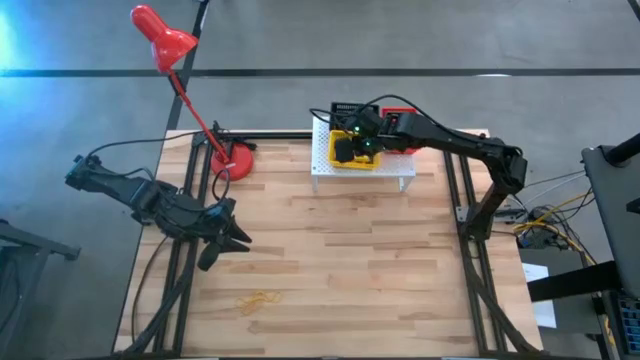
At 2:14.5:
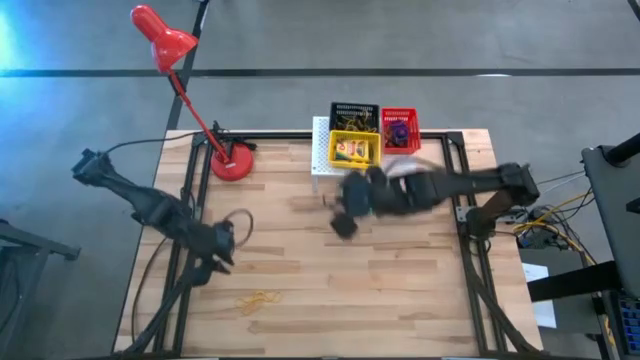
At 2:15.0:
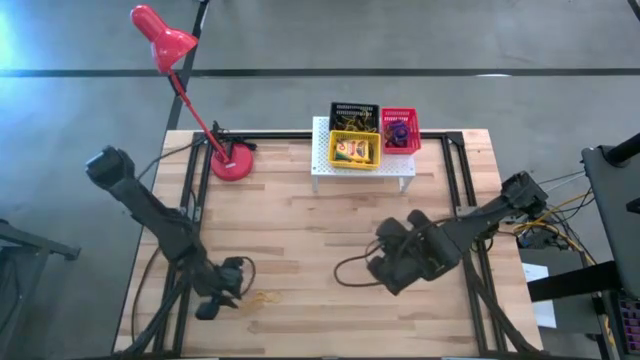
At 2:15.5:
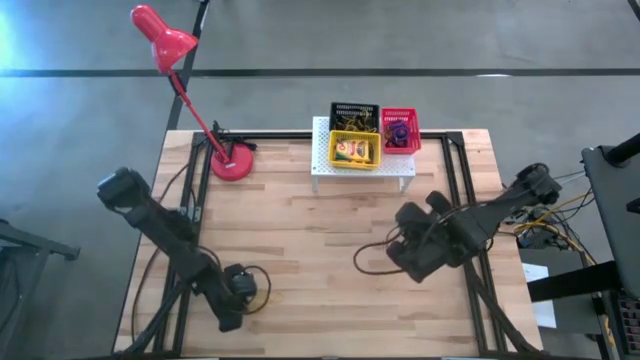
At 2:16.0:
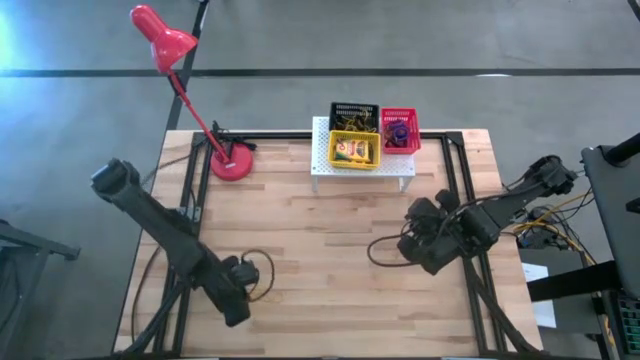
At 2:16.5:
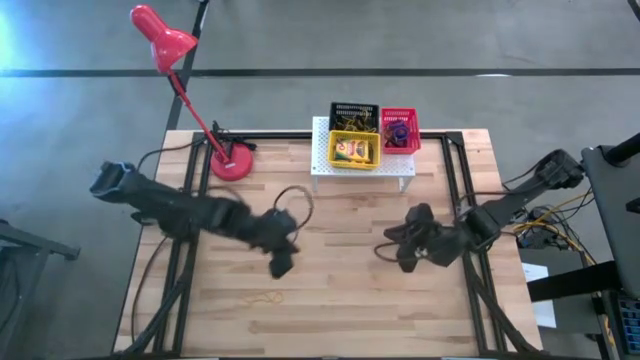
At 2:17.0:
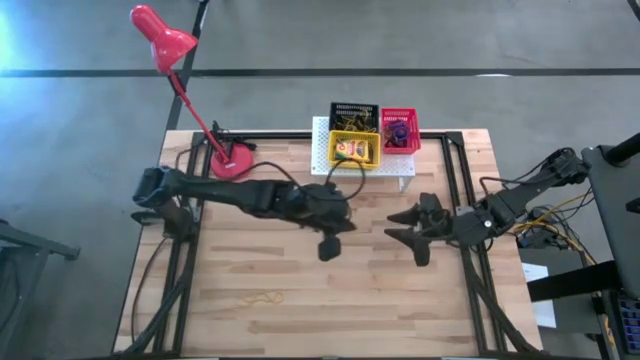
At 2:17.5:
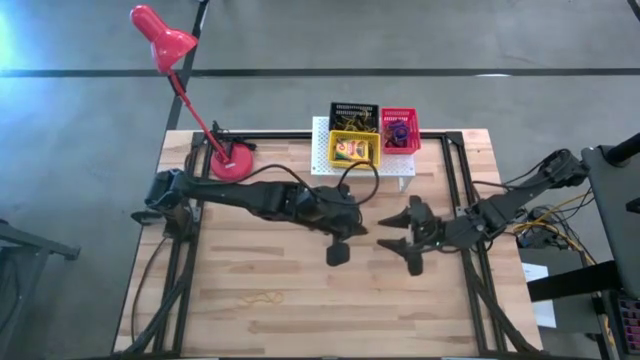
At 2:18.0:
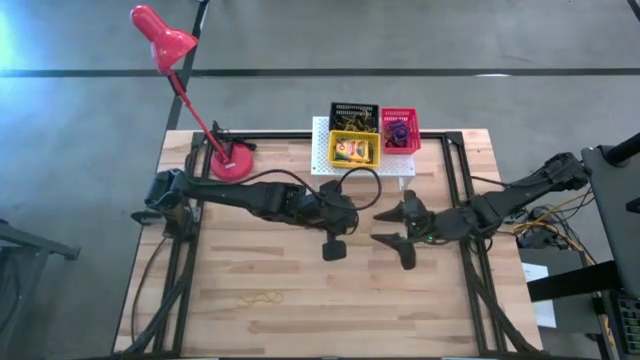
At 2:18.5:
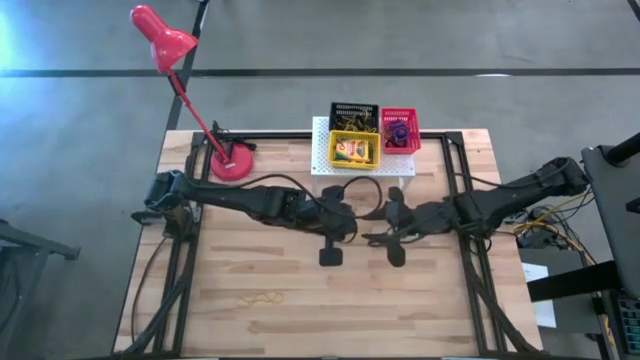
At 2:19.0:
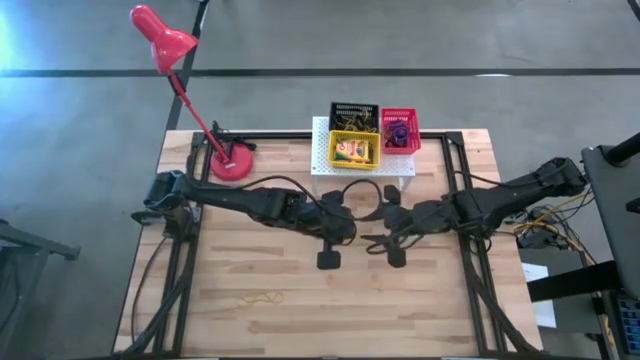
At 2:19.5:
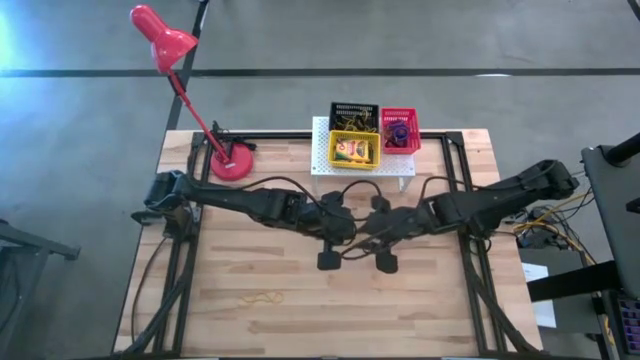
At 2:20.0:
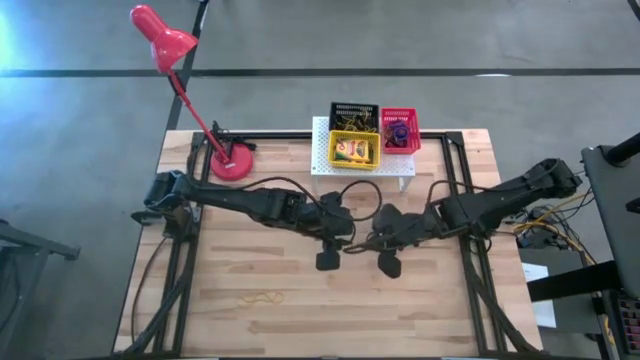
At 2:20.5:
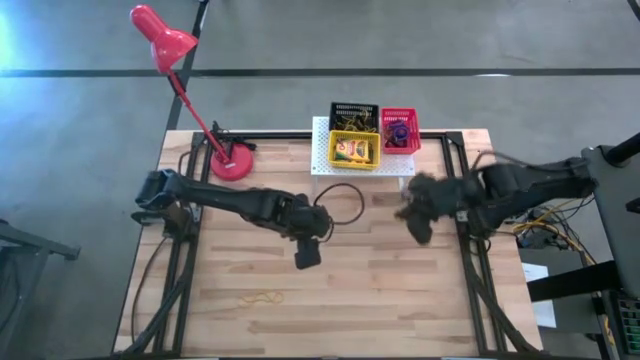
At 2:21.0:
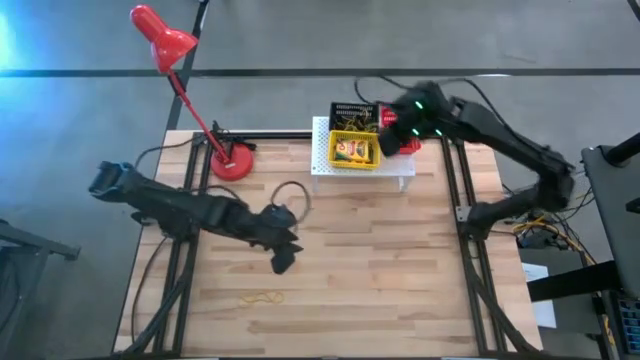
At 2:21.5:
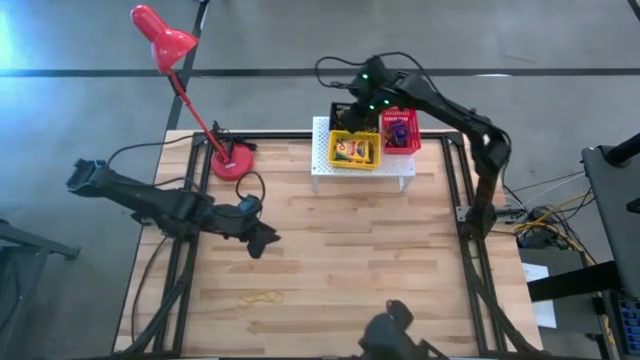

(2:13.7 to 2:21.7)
Task: Pick & Place Office Desk Supplies
Put the yellow rubber band in the black bin on the shelf

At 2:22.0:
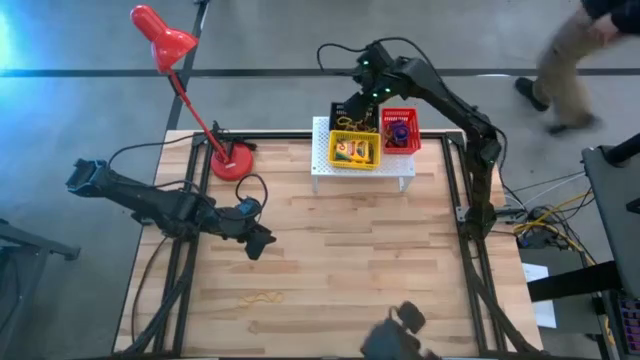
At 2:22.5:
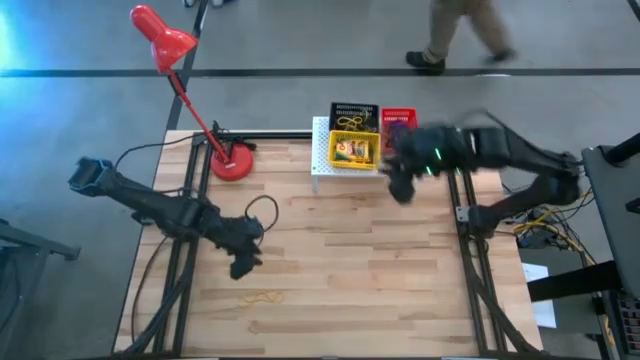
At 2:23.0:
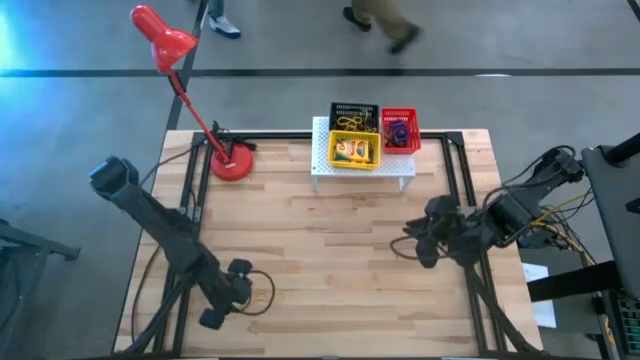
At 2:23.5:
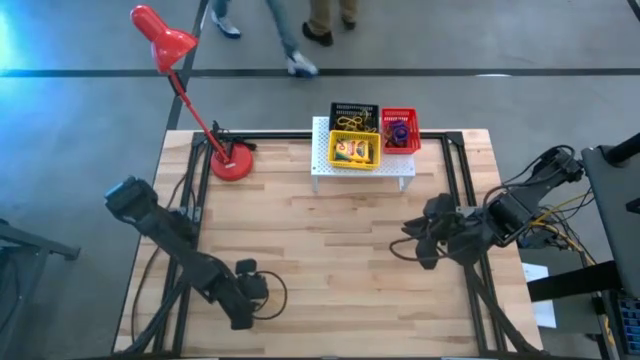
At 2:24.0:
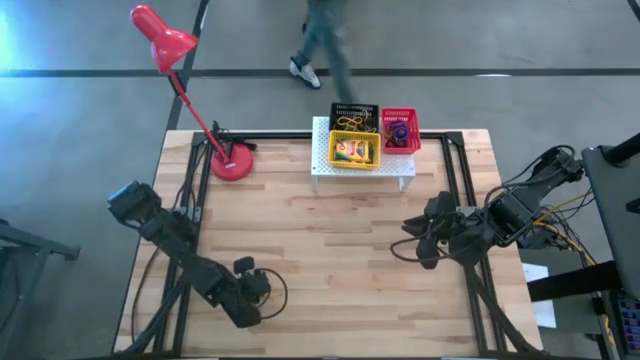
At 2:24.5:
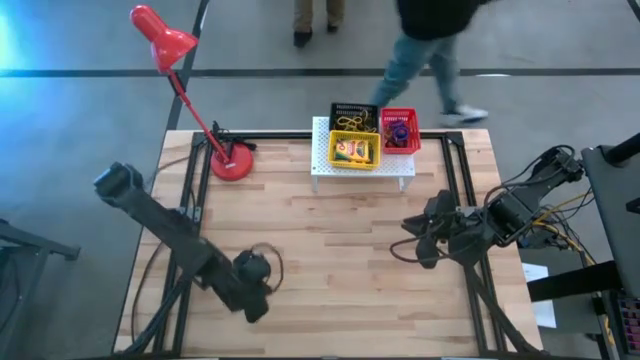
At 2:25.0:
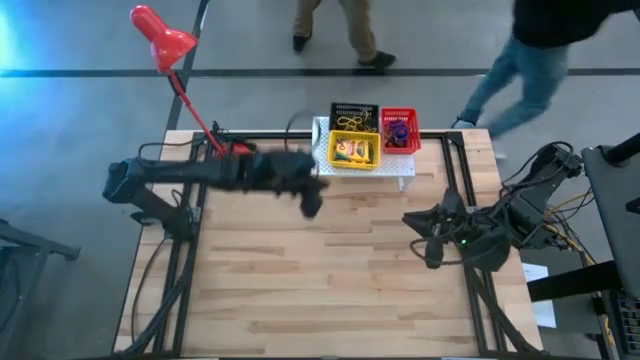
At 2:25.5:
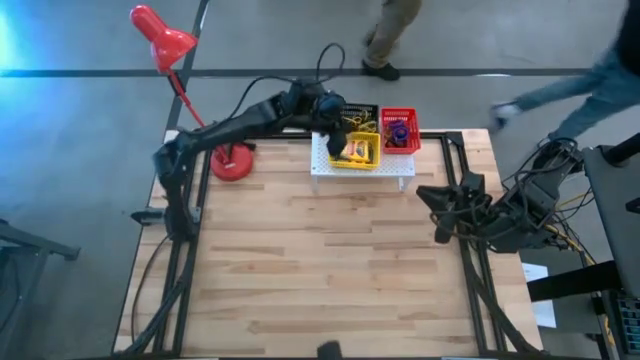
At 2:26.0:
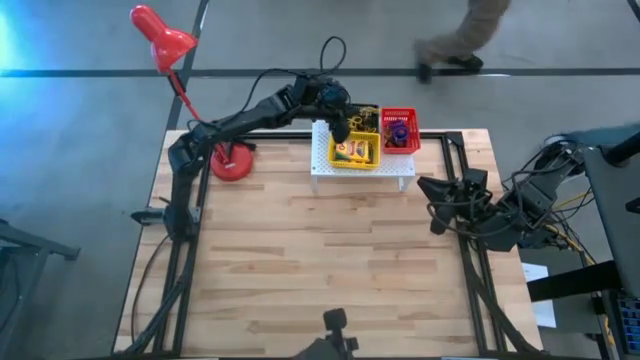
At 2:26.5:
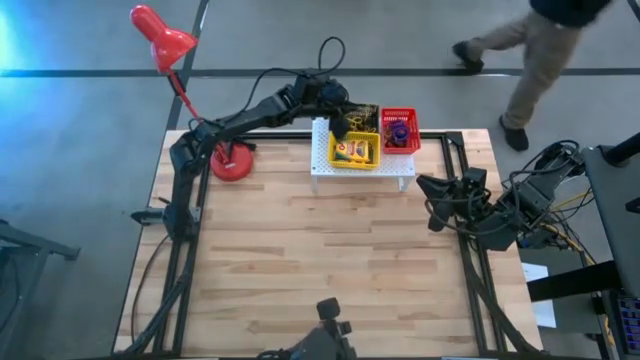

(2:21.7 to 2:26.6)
Put the yellow rubber band in the black bin on the shelf

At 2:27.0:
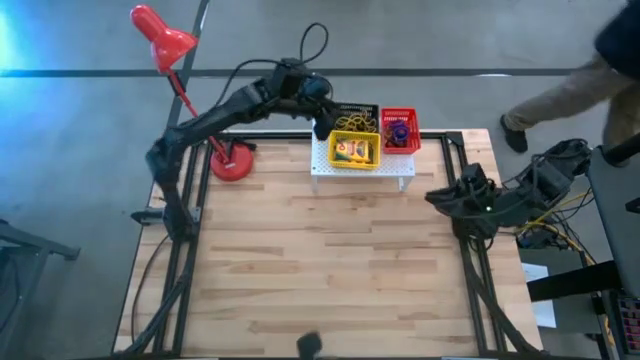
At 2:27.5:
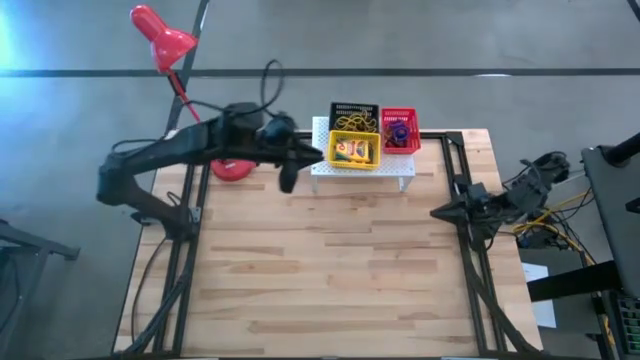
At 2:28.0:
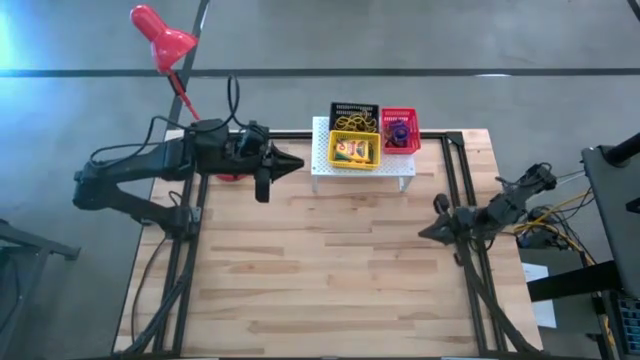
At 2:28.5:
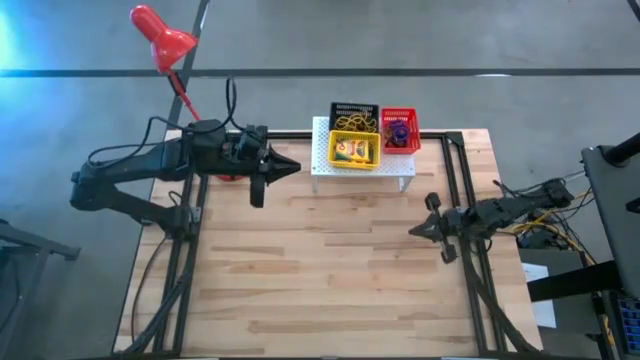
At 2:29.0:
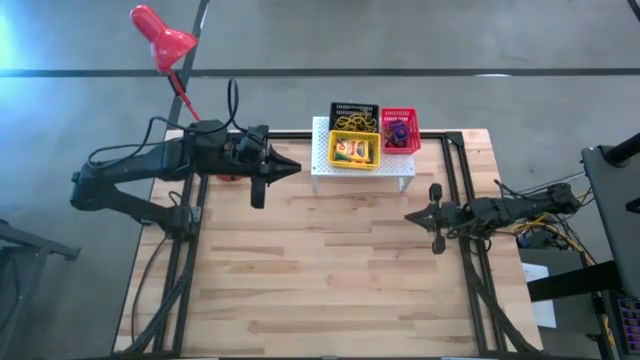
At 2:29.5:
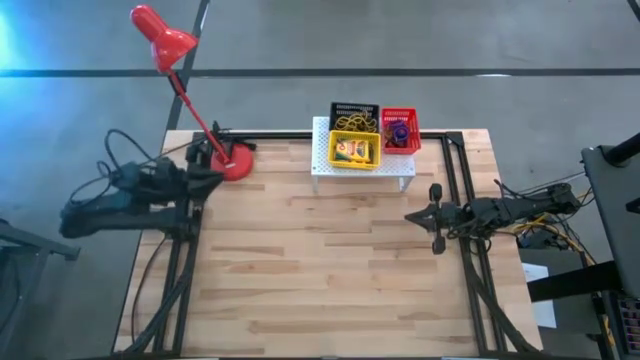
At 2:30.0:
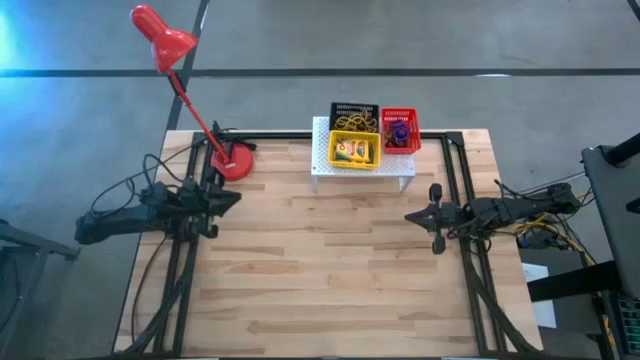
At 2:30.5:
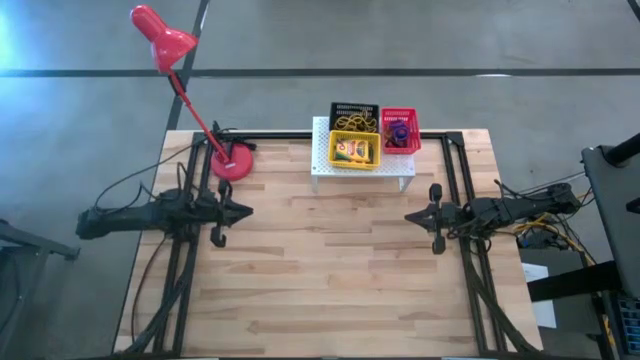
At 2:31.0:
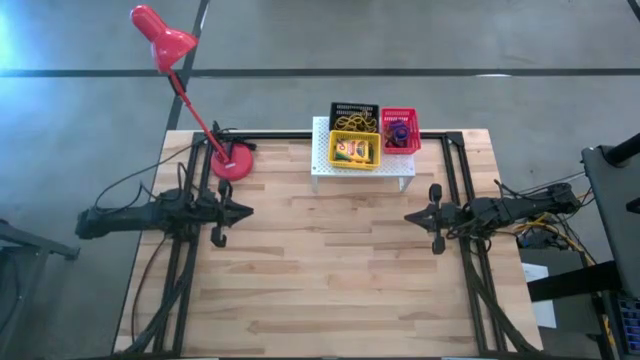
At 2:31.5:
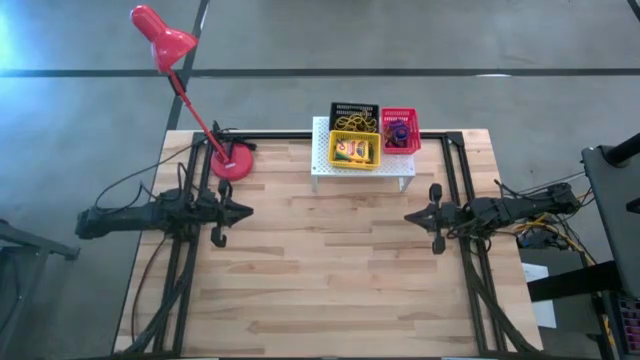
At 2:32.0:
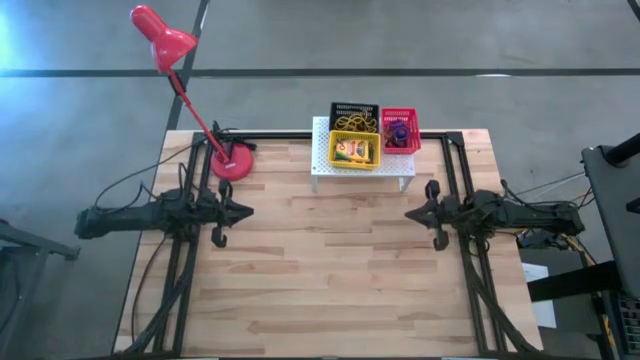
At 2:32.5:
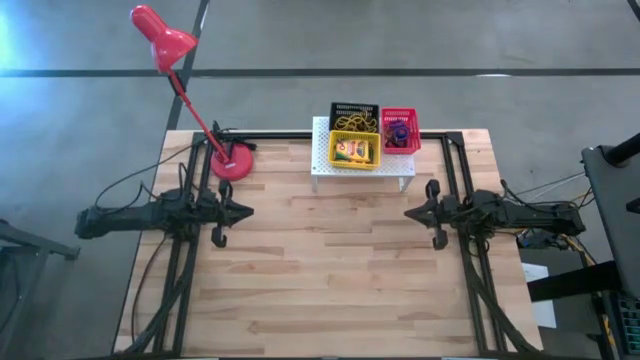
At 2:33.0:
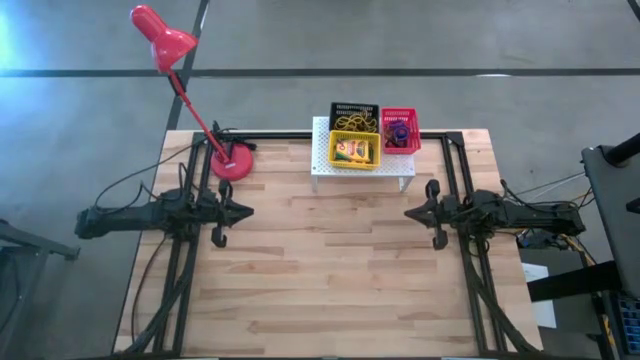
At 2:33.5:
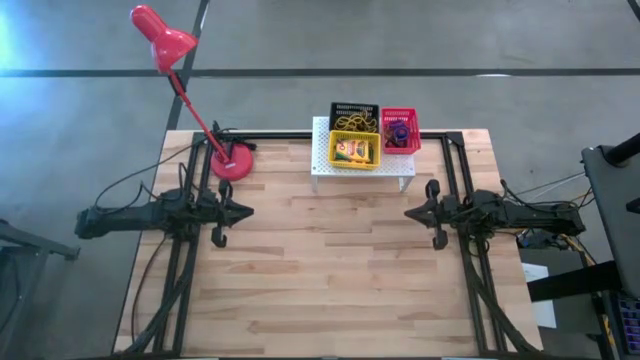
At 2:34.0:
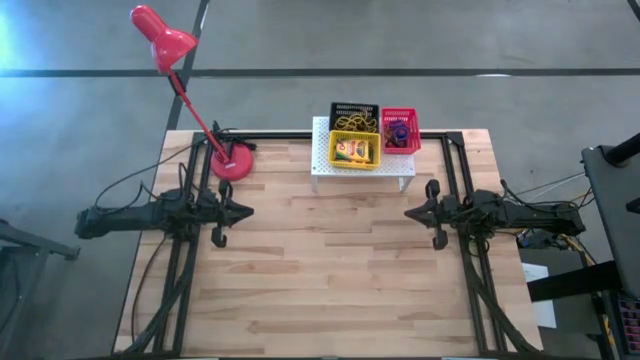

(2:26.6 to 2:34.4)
Return to Home Position

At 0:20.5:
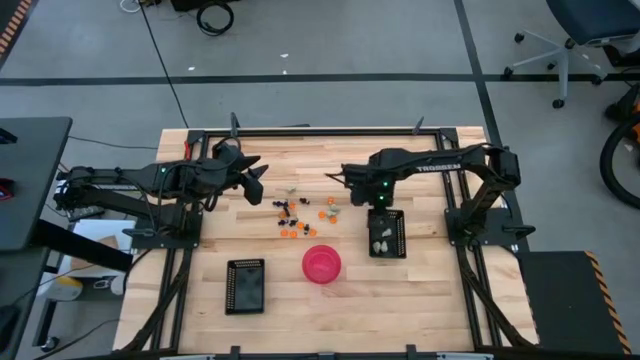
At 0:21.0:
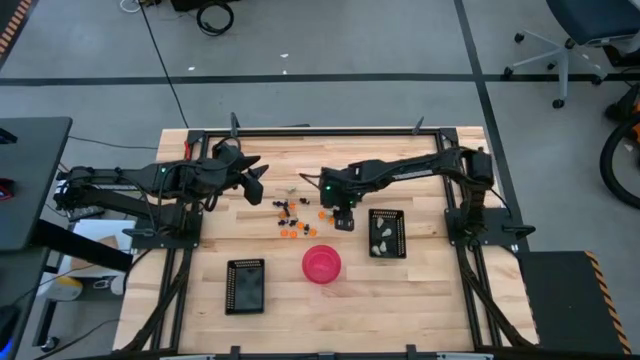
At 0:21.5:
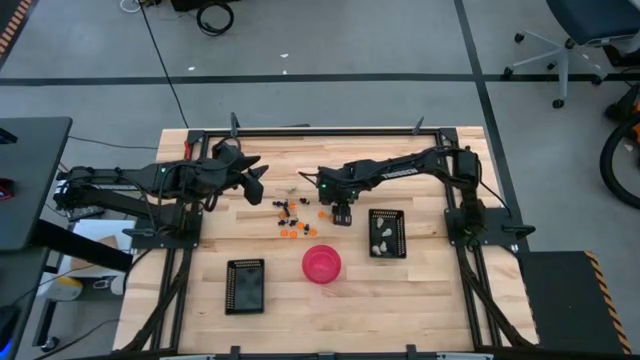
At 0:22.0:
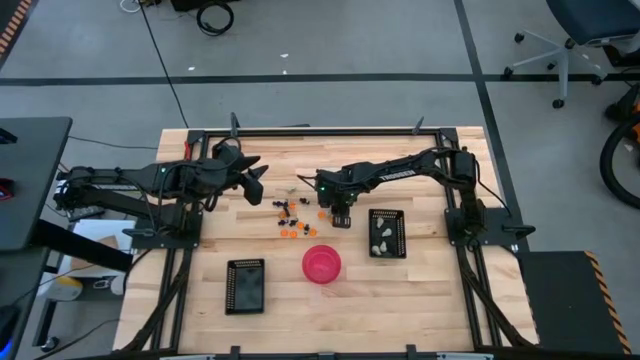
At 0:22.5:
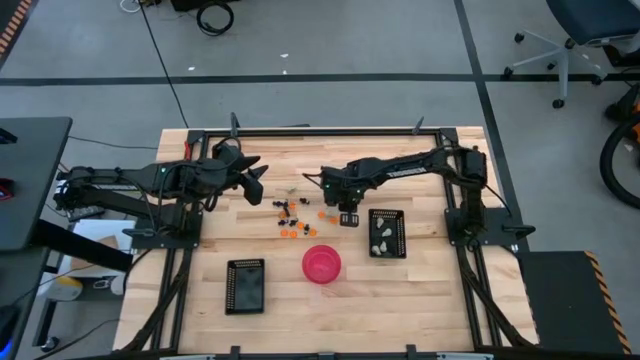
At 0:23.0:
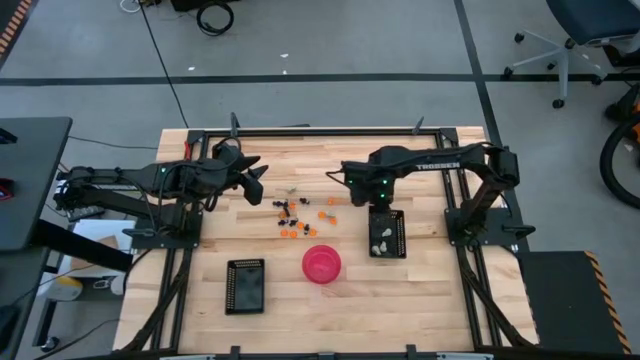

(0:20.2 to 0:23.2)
Task: Sort Halloween decoration
Put the white skull toy into the top black bin
